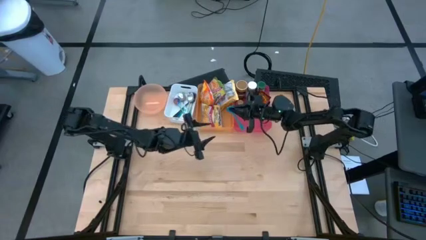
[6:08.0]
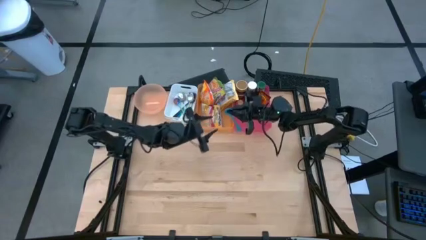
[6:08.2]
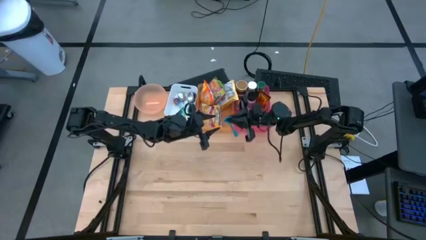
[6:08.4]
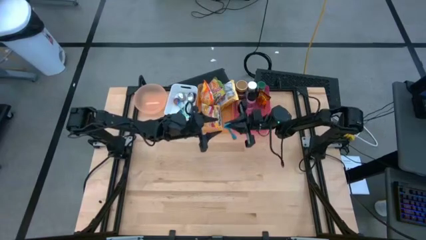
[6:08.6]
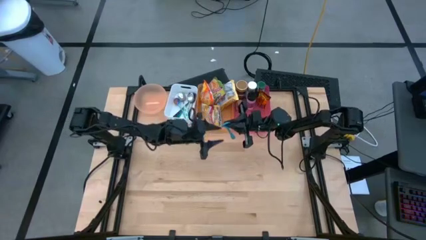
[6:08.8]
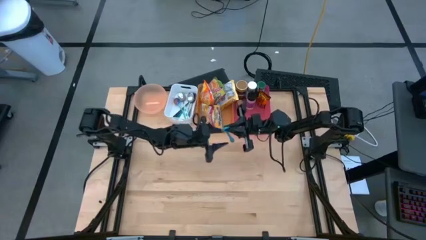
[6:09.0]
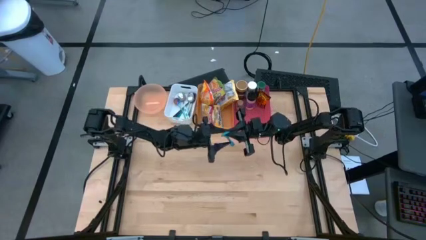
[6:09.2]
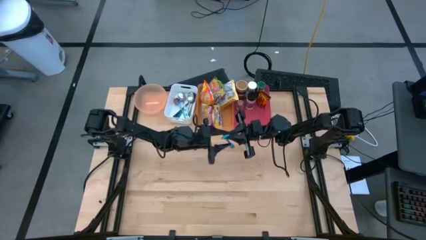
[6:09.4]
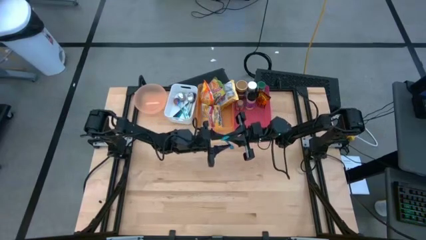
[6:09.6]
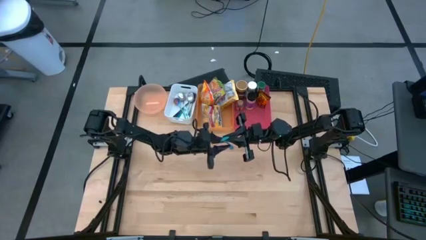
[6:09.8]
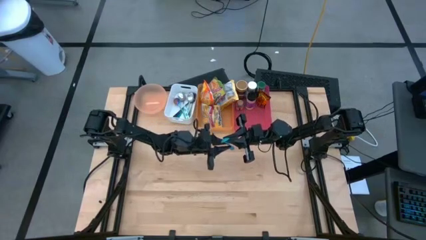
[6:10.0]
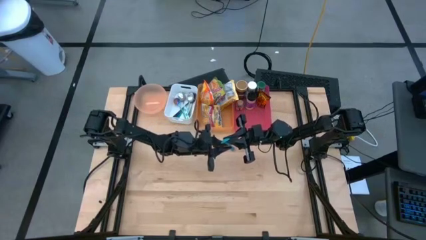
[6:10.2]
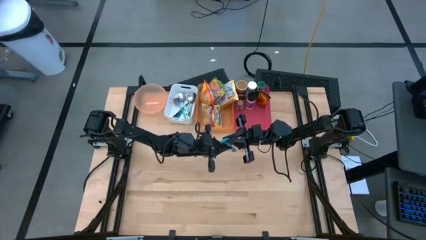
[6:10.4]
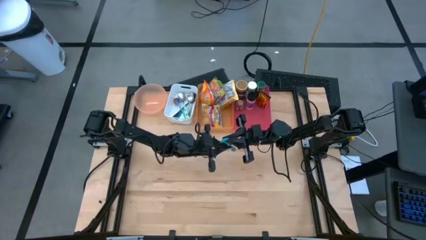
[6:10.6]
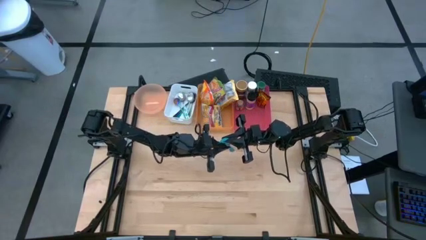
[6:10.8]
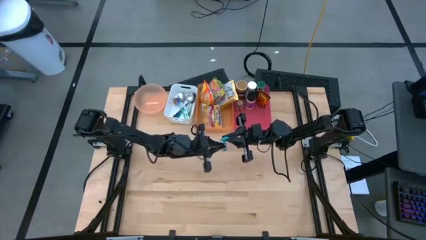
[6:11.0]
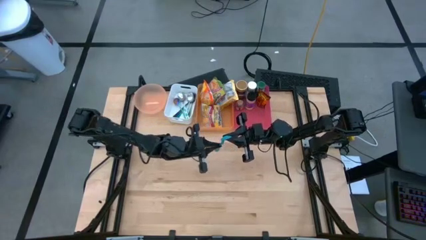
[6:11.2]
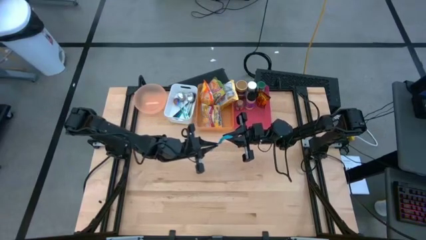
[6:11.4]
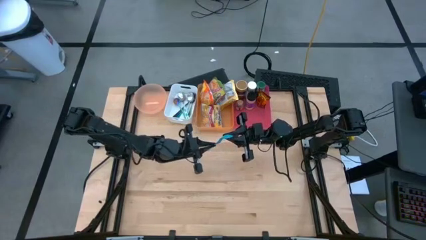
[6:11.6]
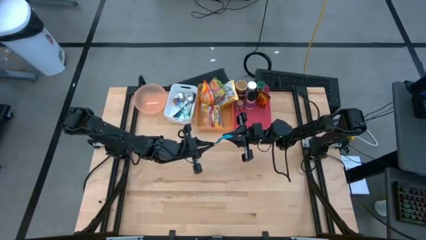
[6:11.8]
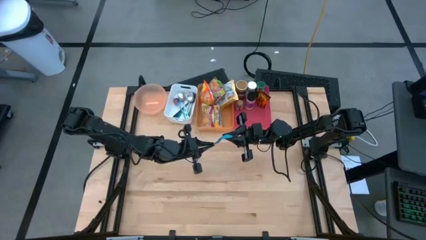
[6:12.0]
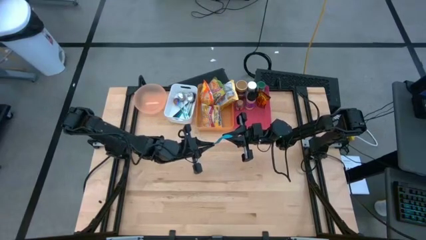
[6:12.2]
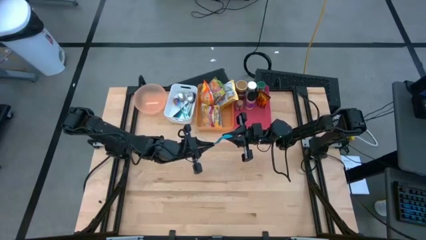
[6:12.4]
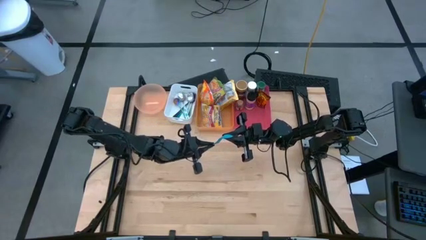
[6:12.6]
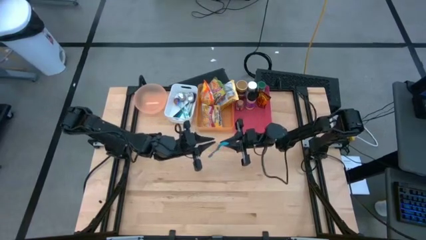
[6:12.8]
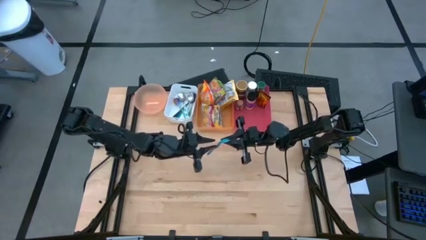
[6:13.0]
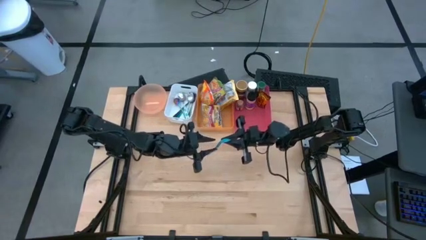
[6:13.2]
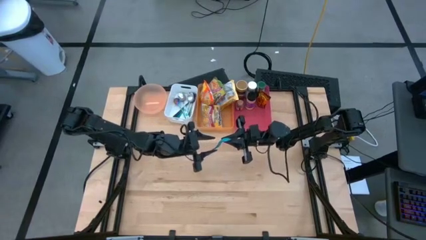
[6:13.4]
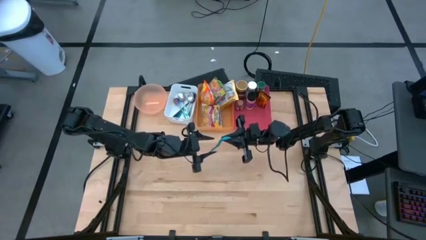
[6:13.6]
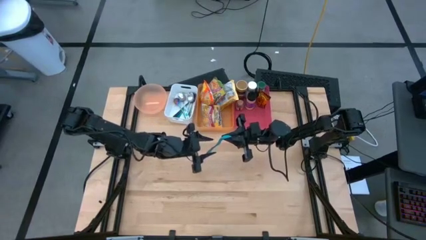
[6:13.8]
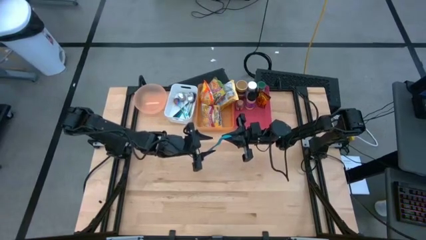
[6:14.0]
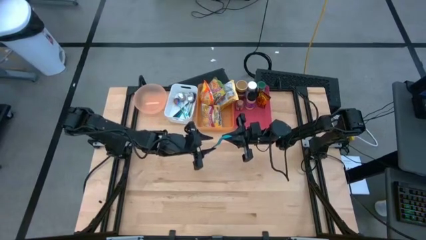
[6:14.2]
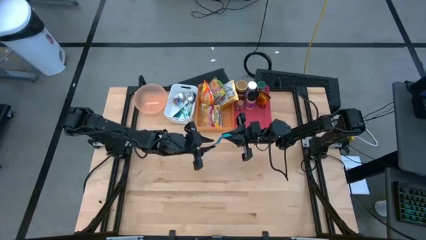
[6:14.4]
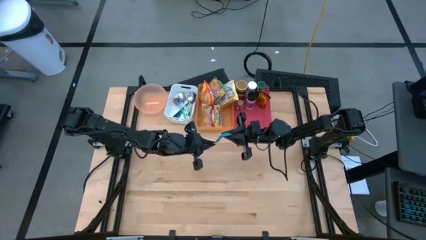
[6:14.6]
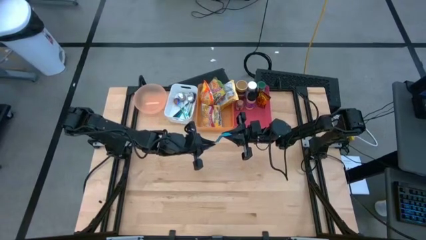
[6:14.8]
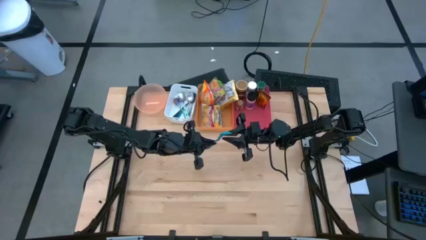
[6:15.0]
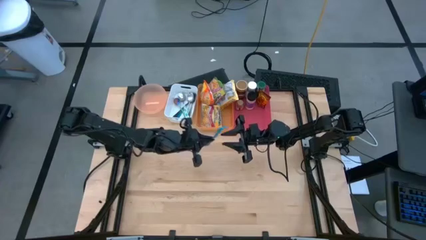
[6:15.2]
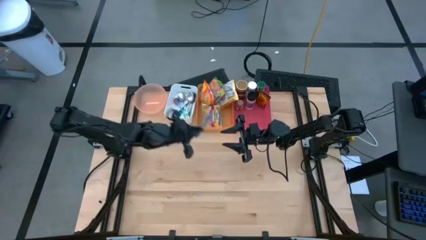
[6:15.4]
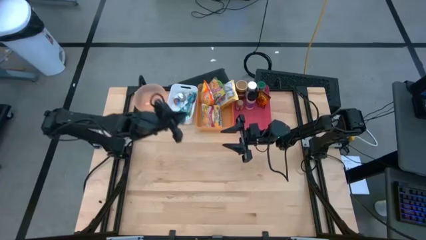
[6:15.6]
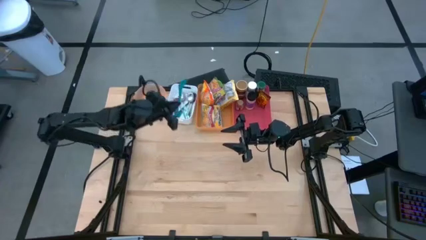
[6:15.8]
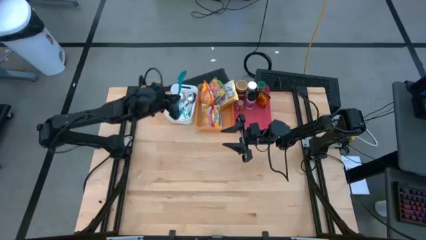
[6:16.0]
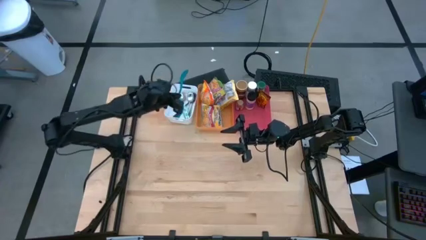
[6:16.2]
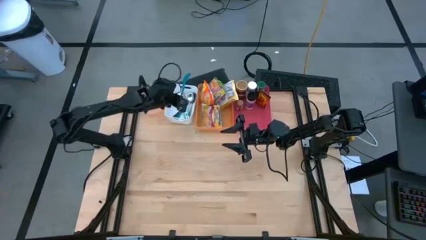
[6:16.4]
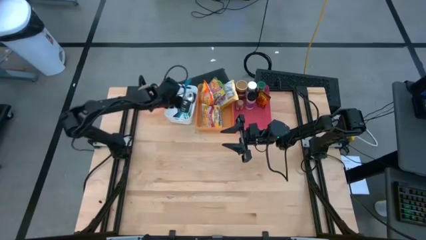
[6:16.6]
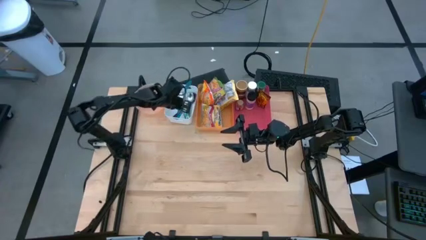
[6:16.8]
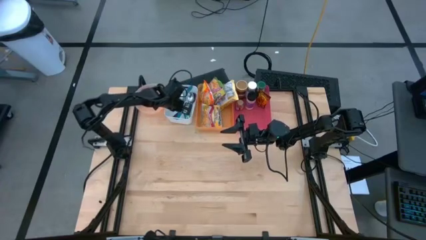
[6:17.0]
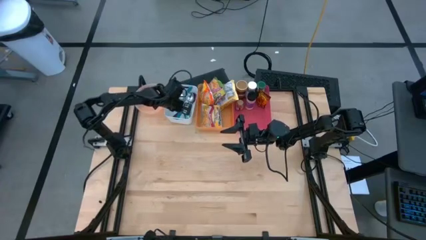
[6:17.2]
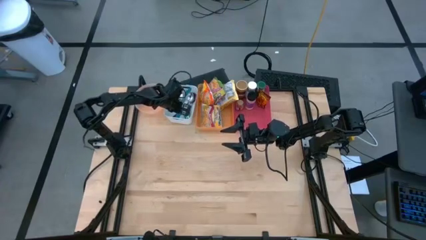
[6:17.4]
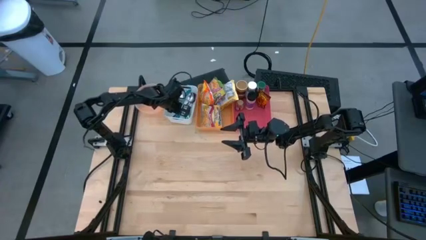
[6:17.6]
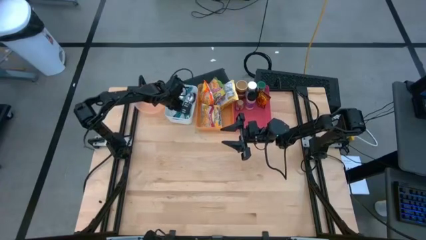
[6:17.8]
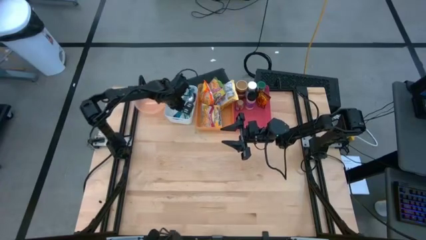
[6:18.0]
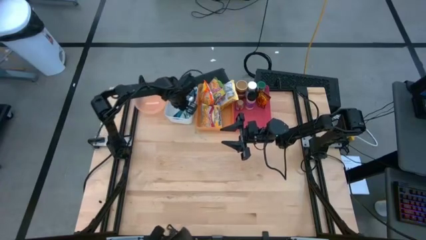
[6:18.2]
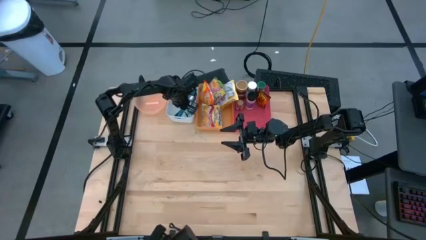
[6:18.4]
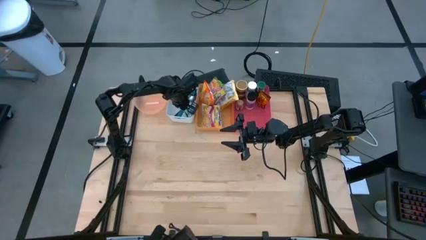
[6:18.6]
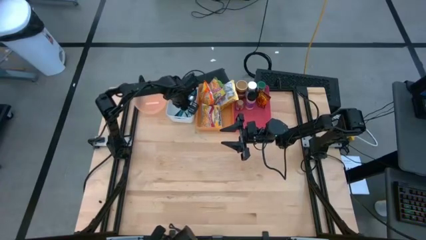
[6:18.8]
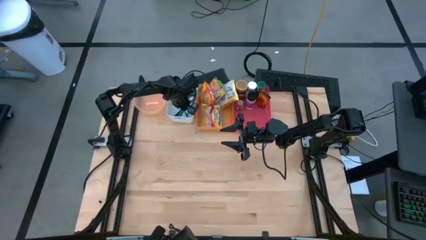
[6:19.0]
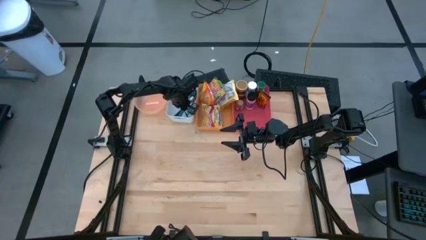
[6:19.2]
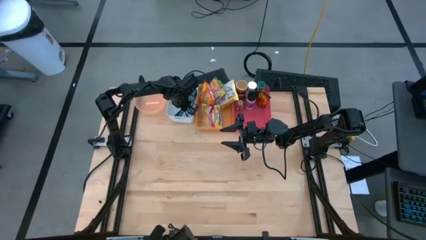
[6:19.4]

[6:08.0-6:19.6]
Task: Pick & Place Food Item
Put the blue baby spoon into the white bin

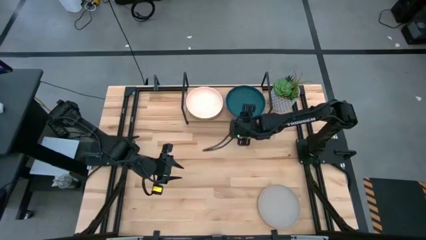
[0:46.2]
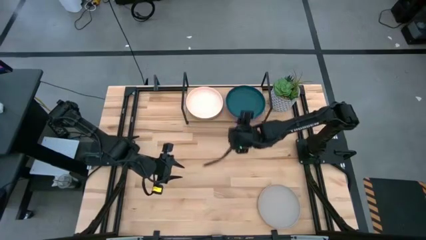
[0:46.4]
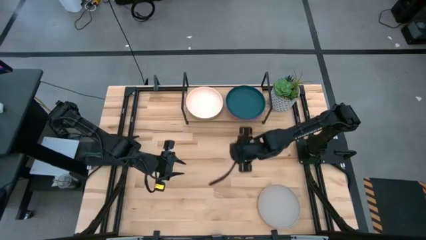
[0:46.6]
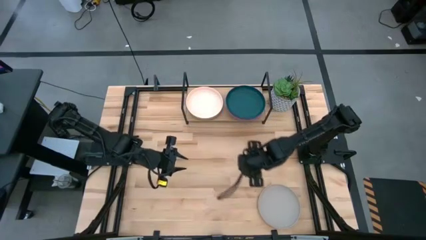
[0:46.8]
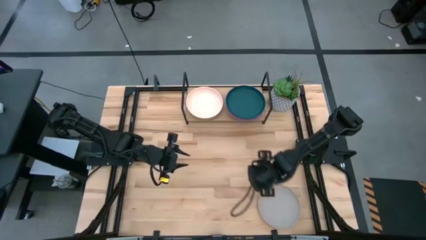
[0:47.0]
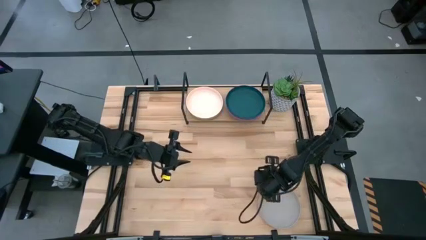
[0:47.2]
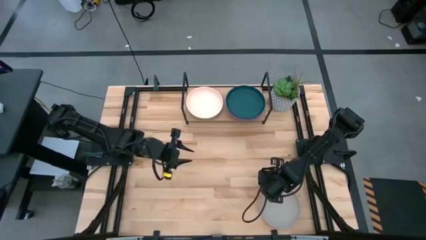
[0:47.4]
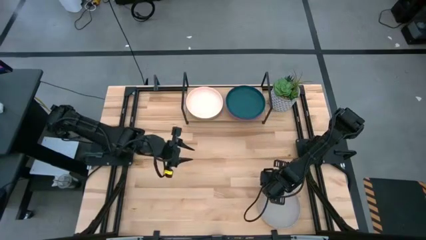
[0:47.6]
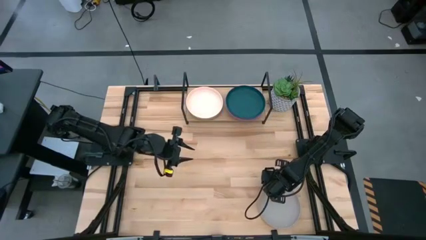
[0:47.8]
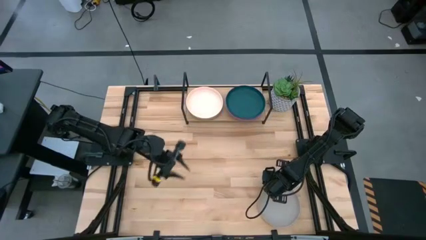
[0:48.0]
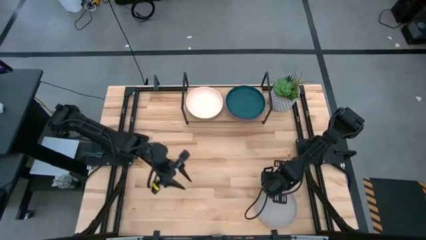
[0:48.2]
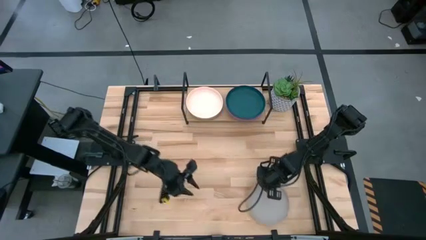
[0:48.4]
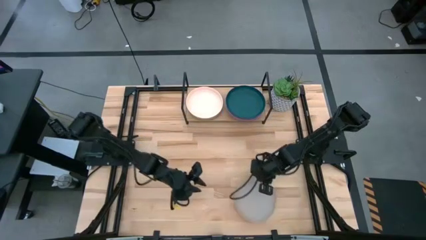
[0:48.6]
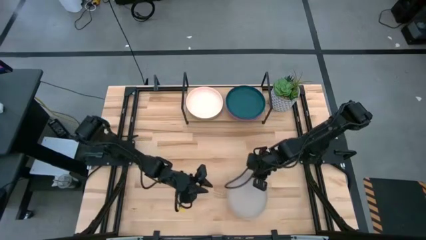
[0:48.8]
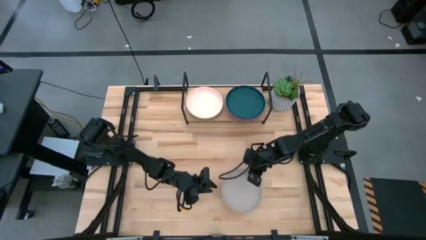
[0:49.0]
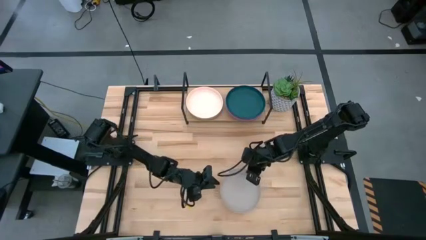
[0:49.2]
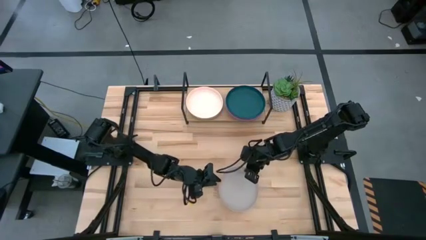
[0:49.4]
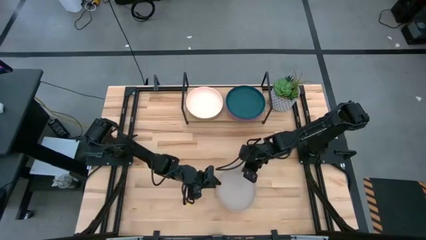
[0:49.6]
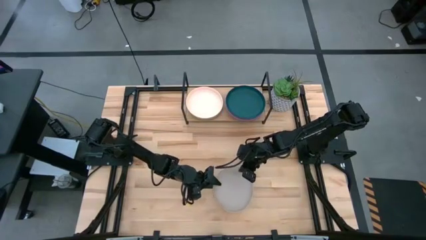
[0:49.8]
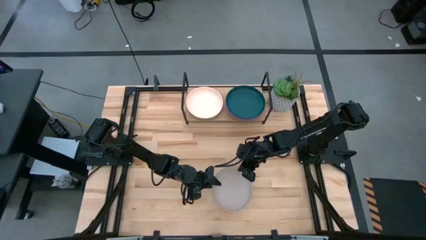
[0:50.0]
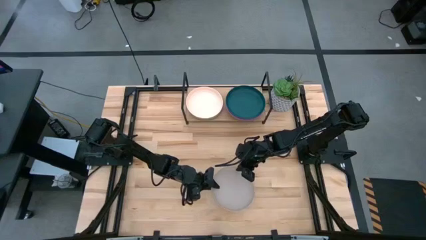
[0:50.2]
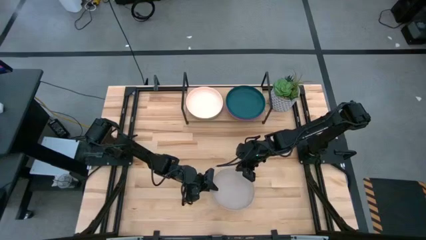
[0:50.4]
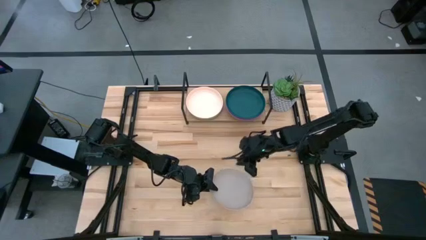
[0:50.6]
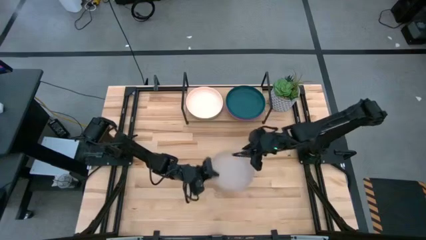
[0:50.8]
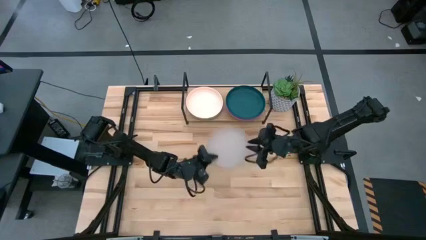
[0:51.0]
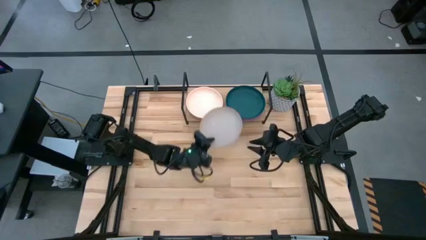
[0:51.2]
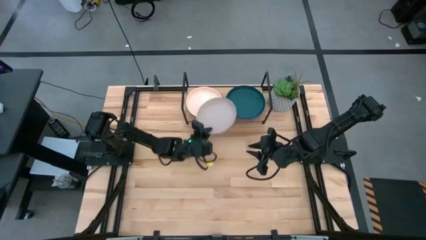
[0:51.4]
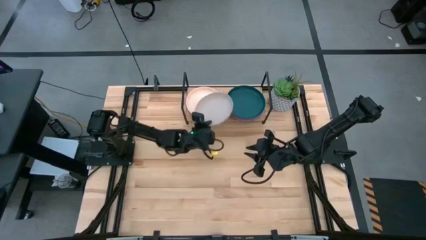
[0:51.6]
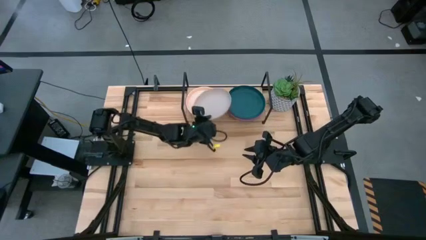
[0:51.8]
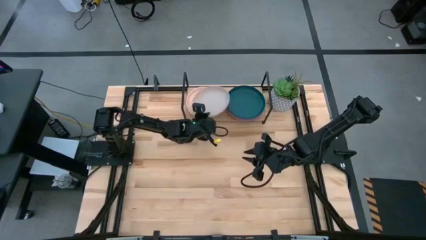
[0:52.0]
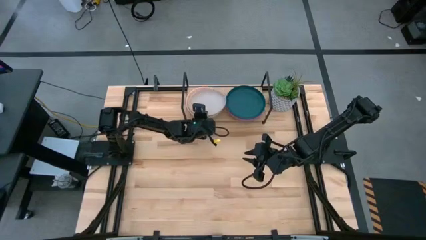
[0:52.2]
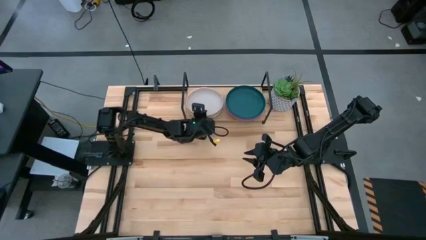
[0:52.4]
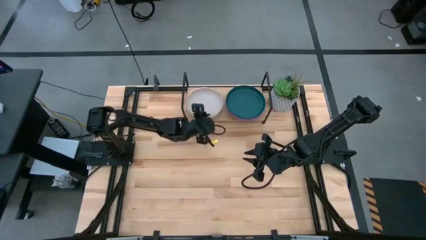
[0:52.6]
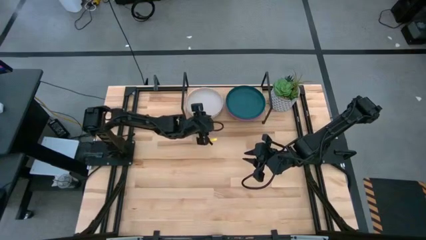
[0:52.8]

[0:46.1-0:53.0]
Task: Place and stack plates onto a shelf
Stack the gray plate on top of the white plate on the shelf
